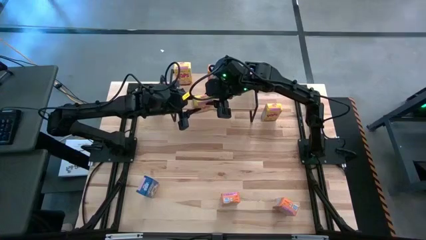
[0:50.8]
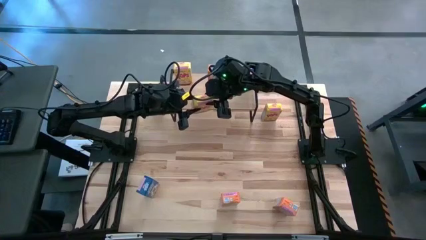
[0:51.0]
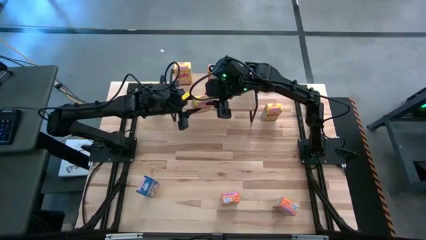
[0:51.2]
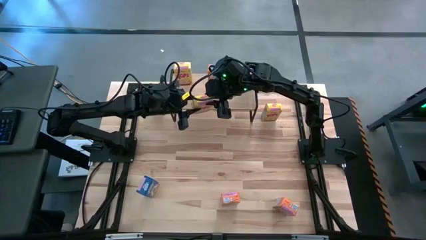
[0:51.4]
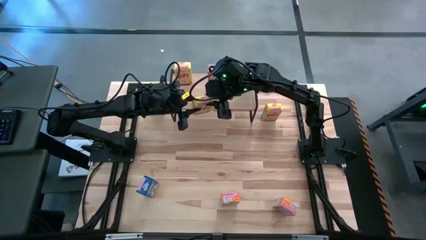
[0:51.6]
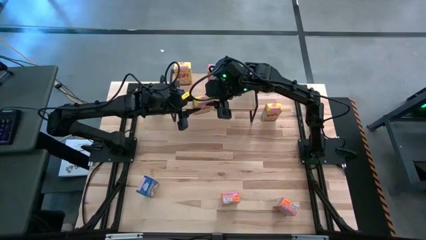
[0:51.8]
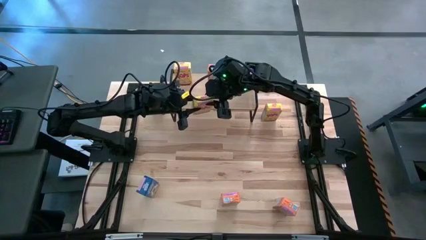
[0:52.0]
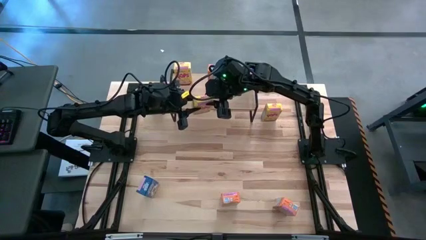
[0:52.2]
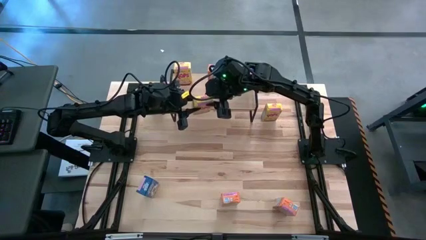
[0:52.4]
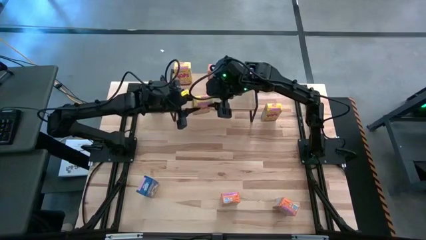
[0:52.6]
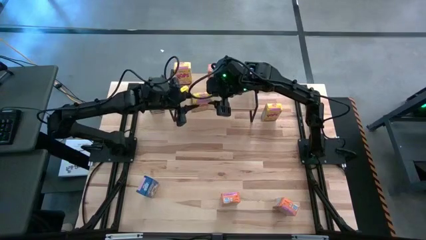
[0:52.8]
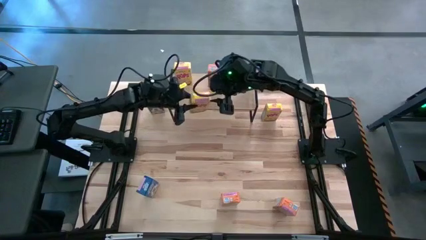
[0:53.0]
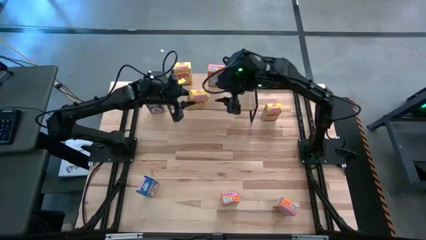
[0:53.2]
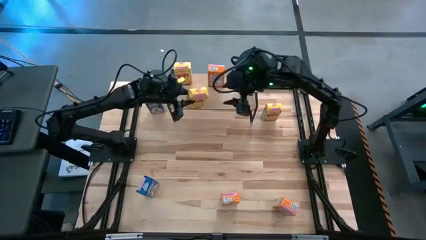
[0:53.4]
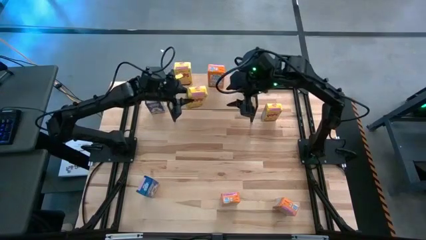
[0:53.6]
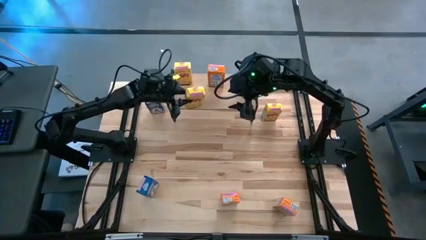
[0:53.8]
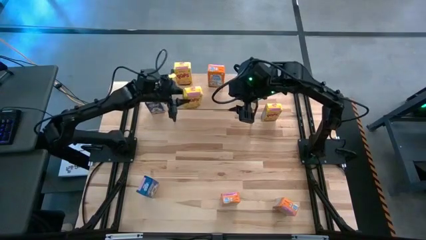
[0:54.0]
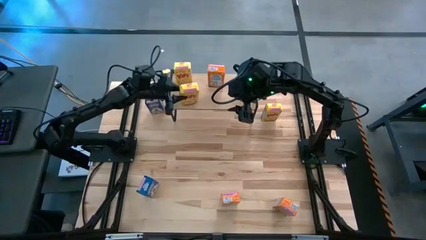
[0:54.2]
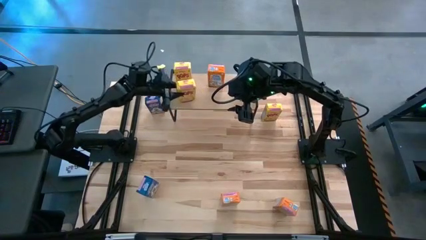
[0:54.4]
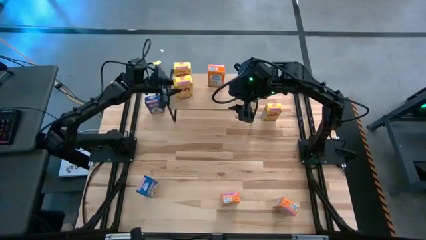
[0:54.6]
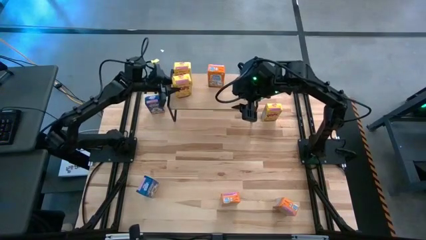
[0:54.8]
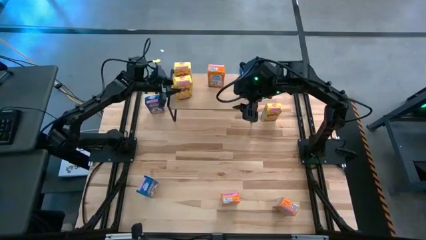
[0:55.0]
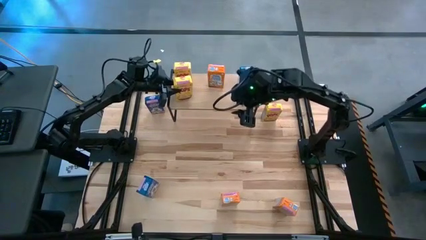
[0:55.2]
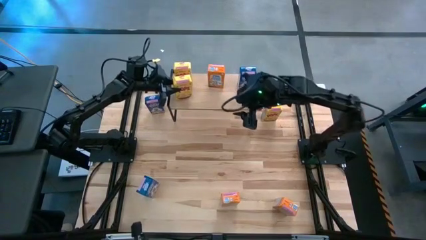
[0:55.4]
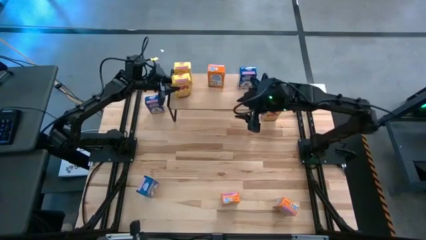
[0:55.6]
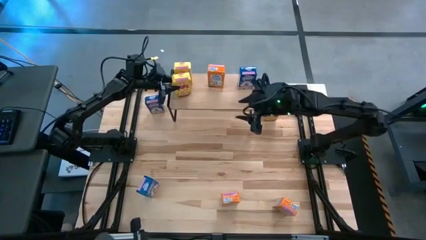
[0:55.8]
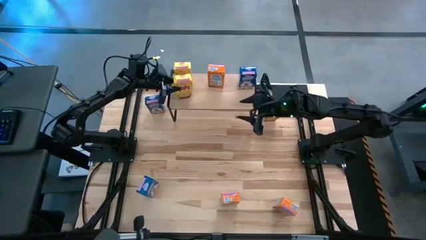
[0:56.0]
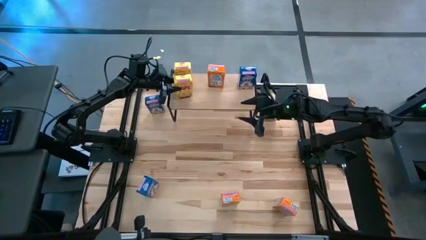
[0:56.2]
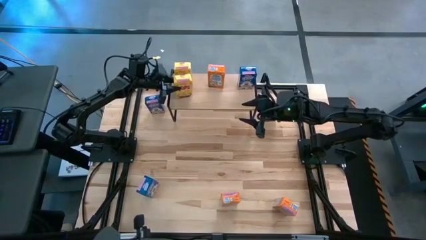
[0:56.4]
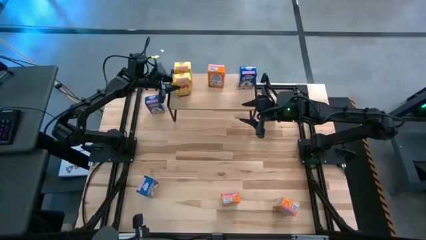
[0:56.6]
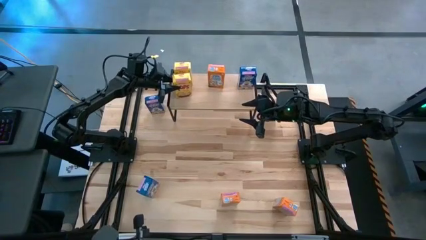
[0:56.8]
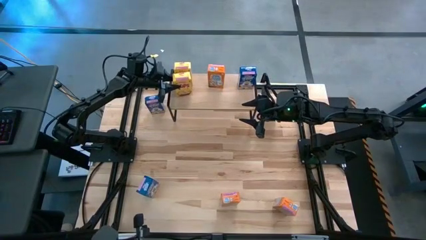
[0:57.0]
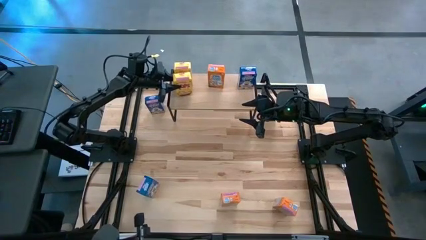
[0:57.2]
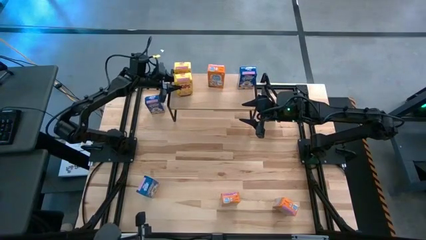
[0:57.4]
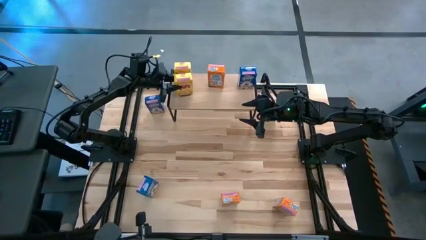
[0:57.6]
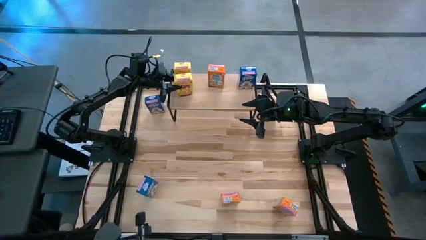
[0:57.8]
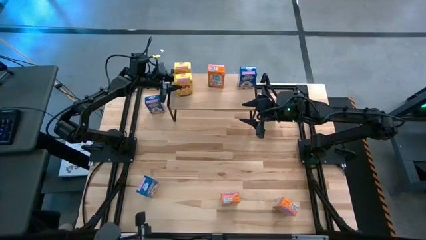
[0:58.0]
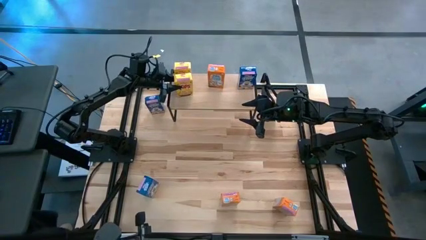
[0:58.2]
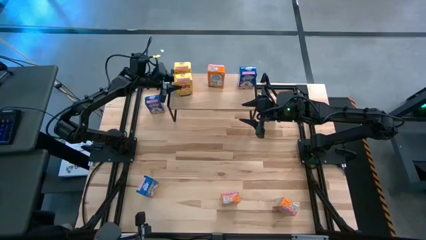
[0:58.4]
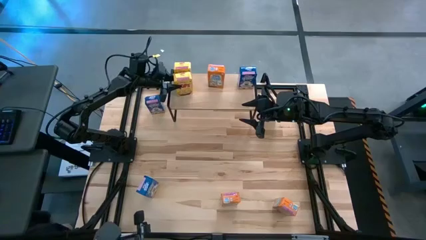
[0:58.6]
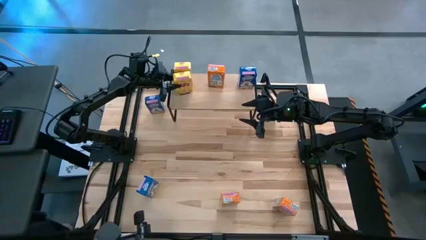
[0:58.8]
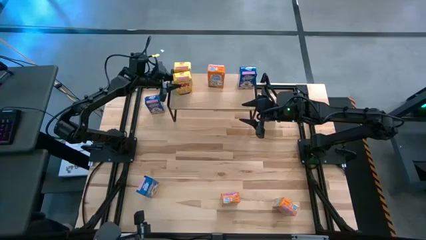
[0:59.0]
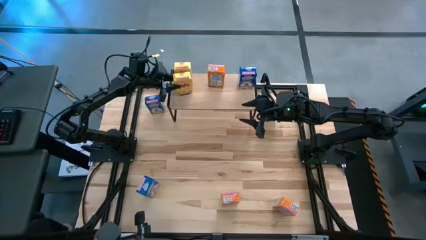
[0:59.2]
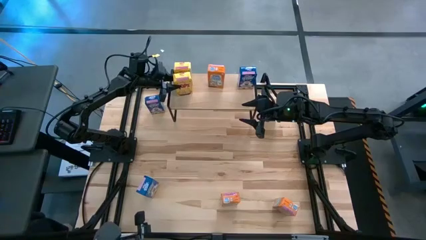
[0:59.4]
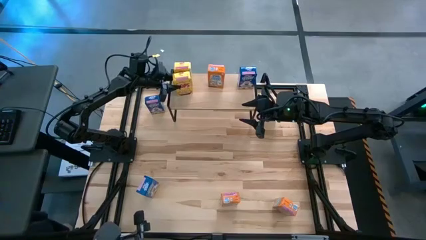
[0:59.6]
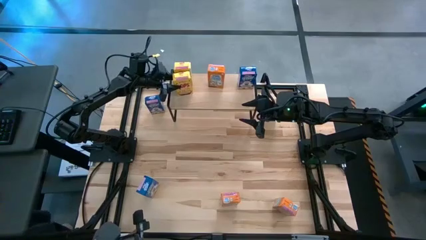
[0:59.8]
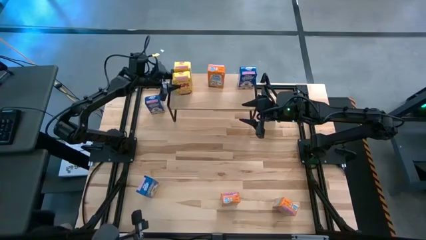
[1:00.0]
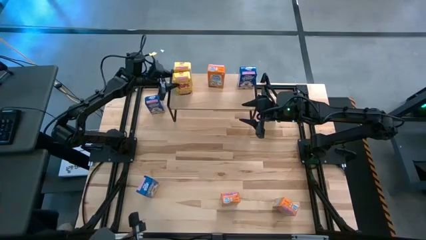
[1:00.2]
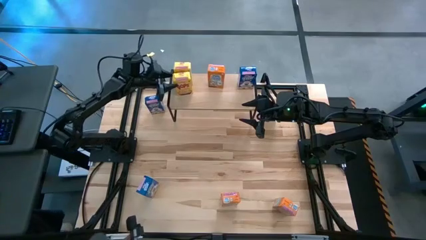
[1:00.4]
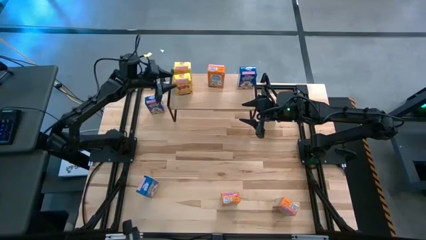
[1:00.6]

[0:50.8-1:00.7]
Task: Stack cereal on shelf
Put the bottom yellow cereal box on the shelf aligned with the other yellow cereal box
